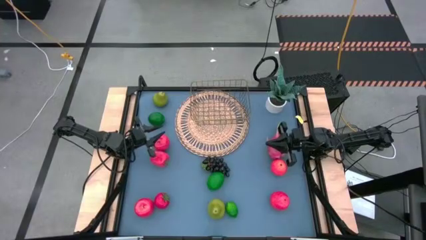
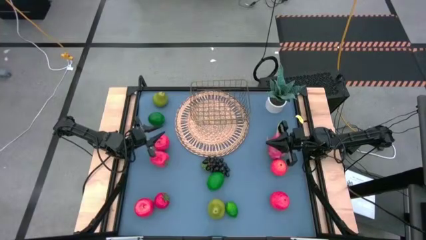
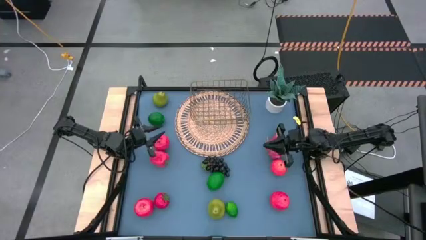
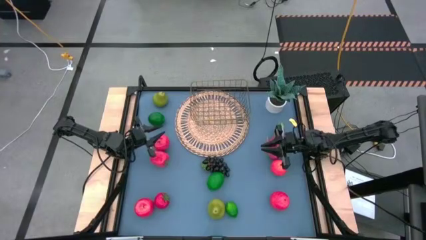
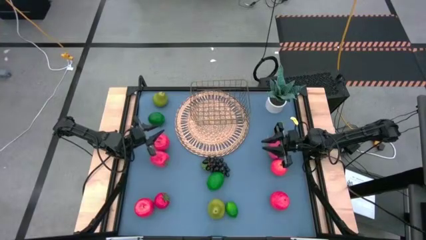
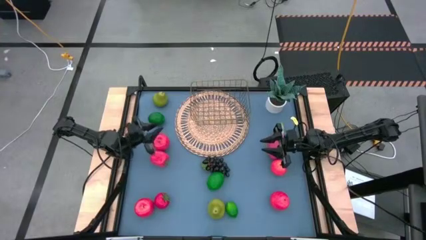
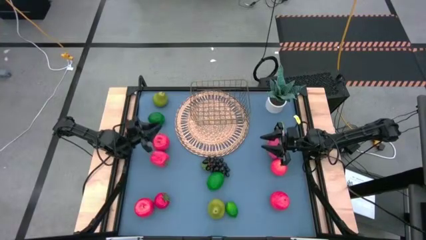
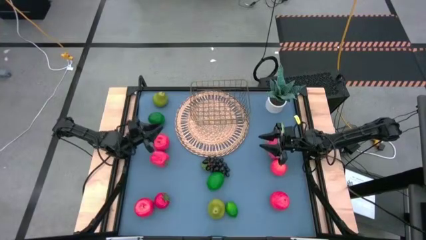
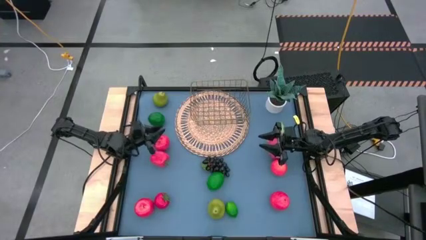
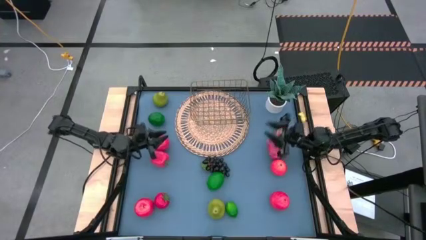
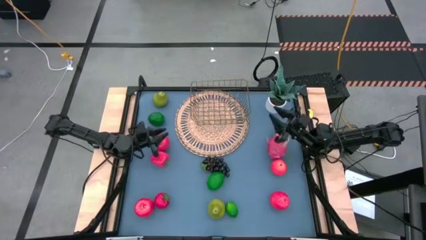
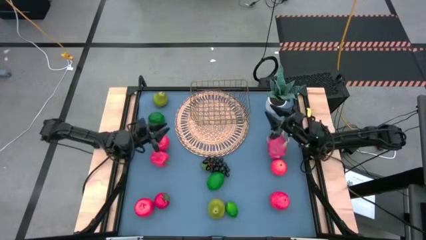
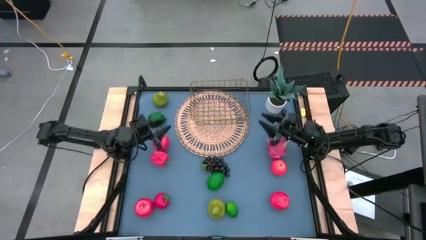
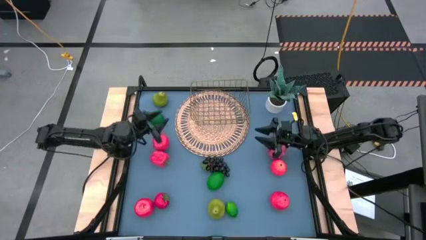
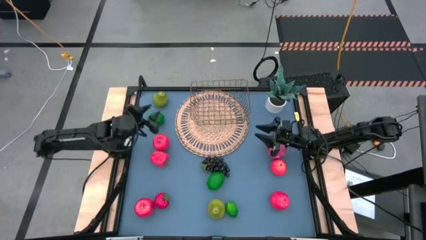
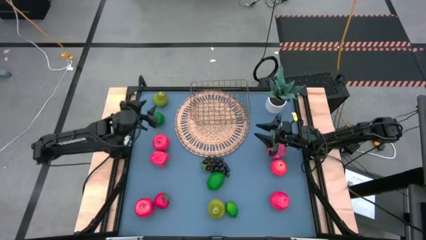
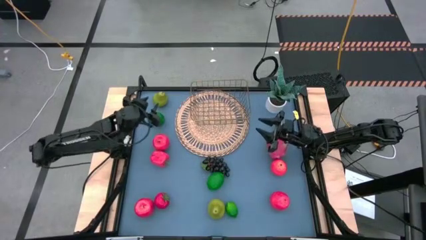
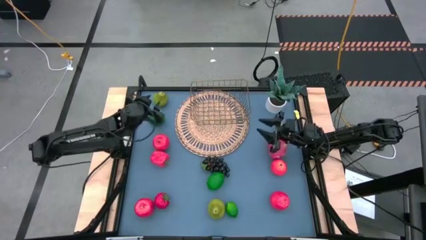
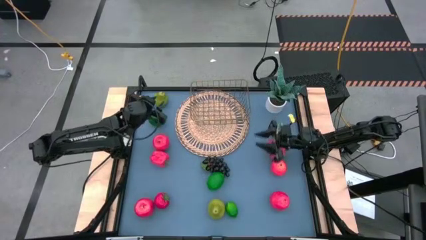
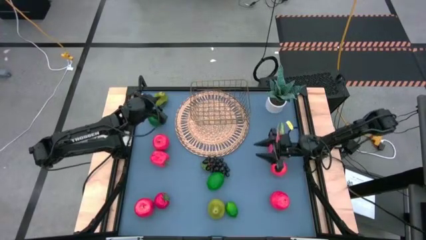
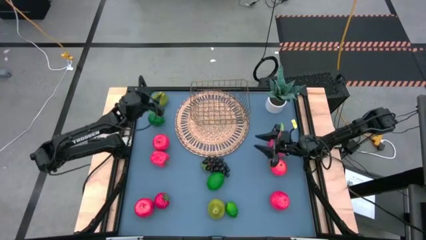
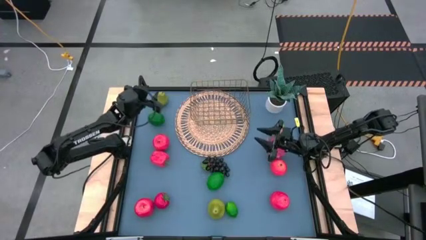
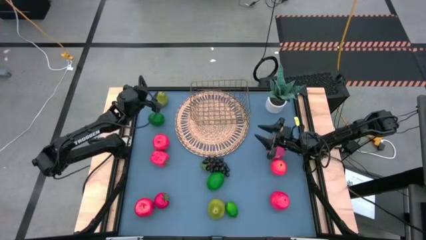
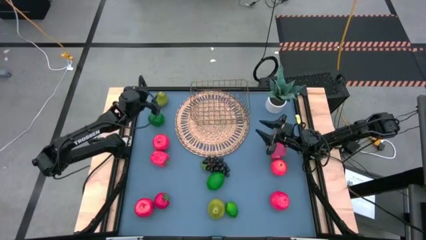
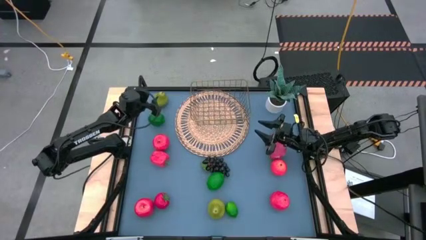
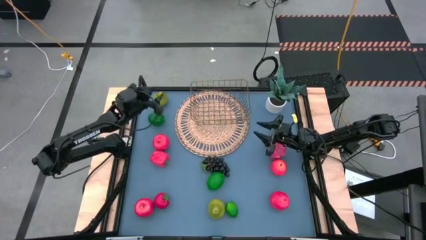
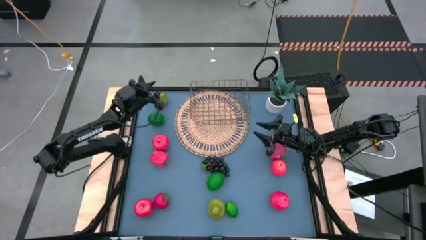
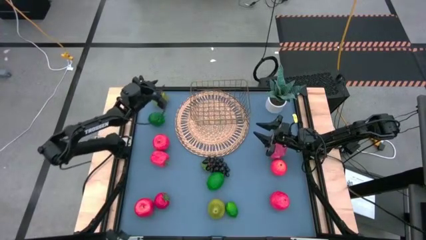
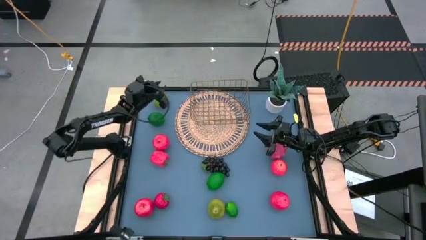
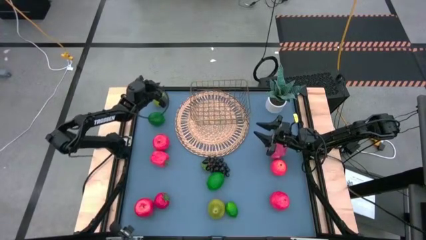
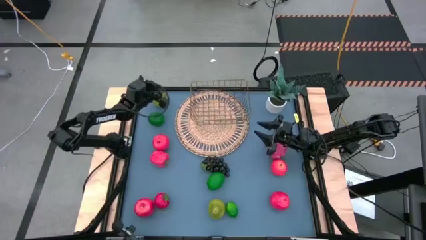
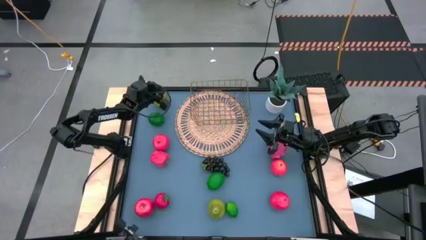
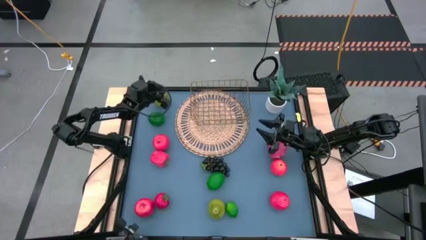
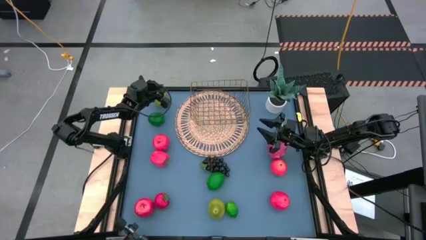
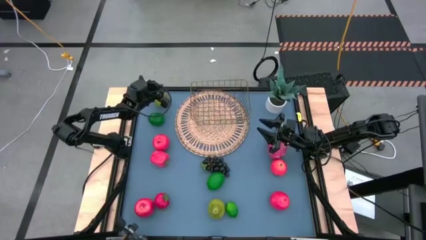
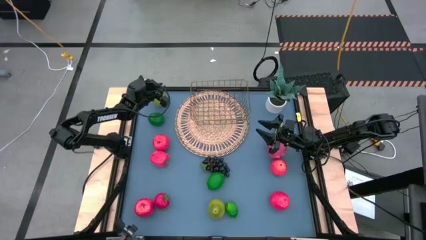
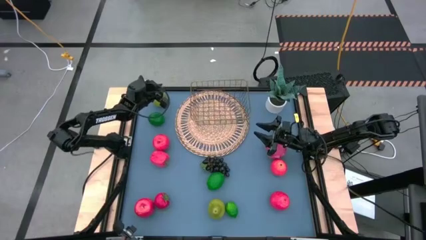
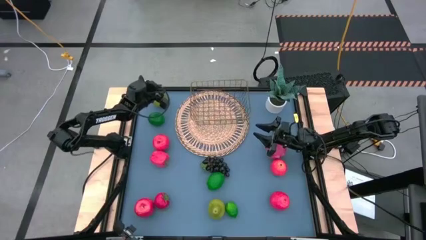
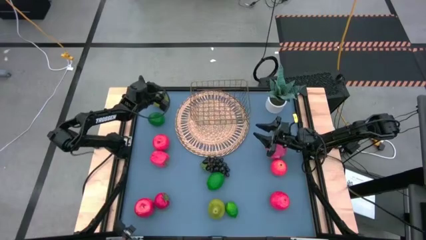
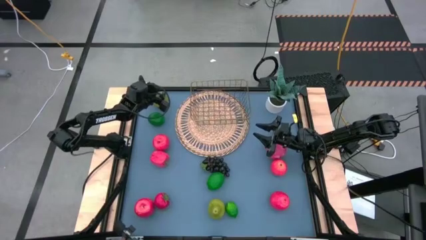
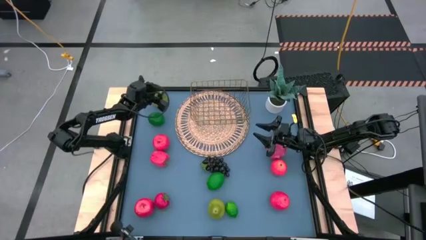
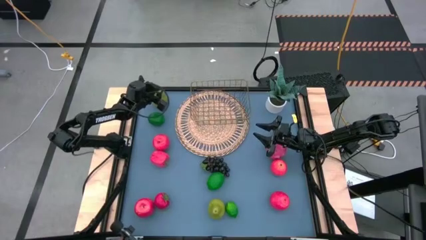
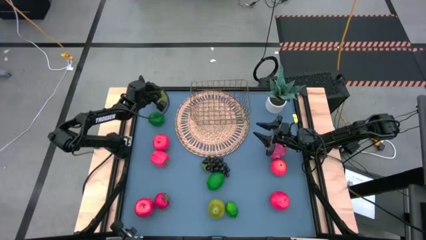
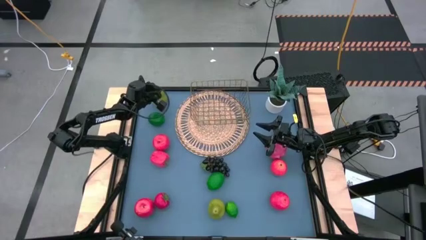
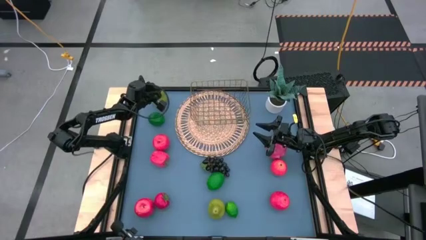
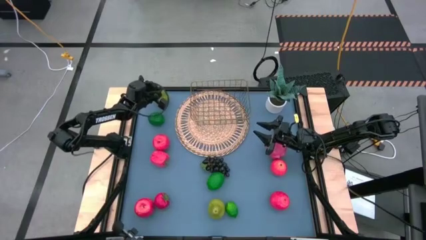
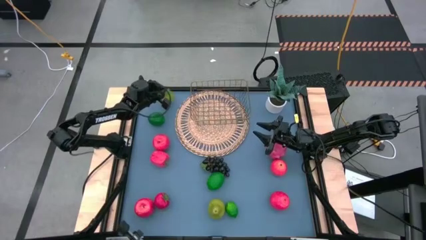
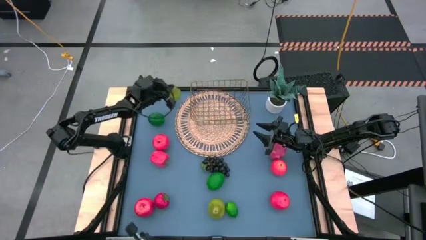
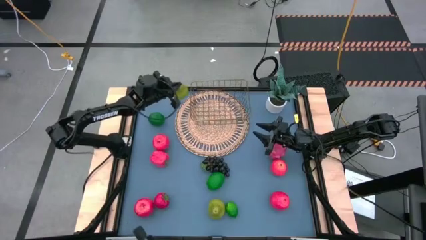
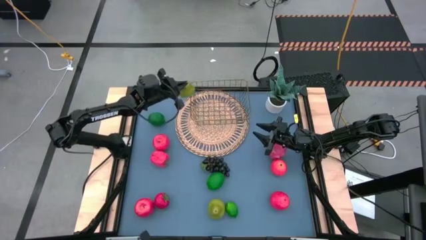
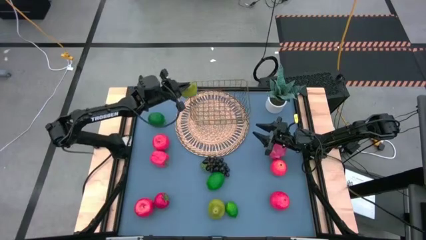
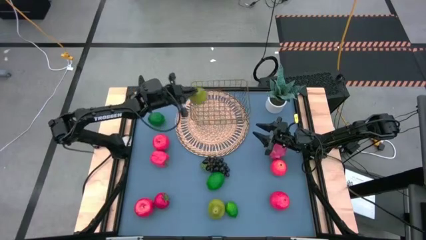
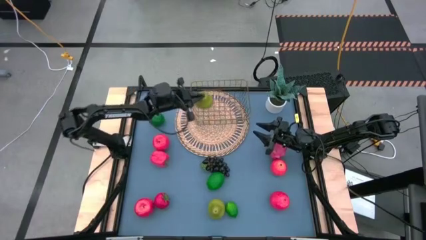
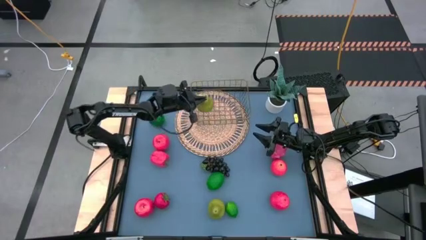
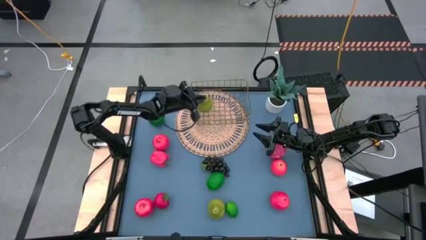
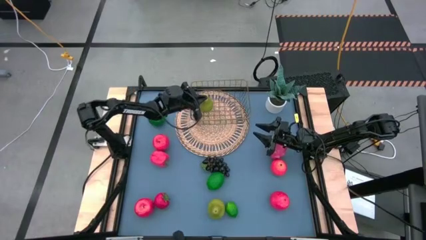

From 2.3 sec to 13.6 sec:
Task: Build produce basket
Put the top green pear into the gold wire basket

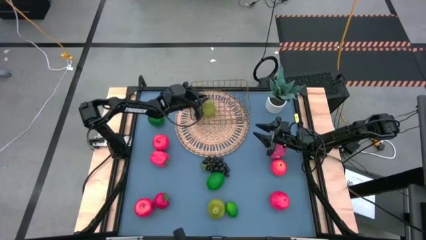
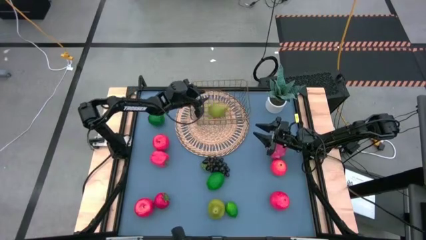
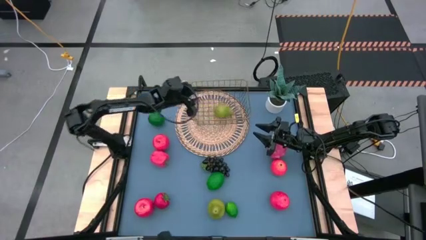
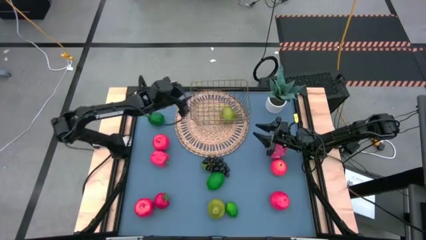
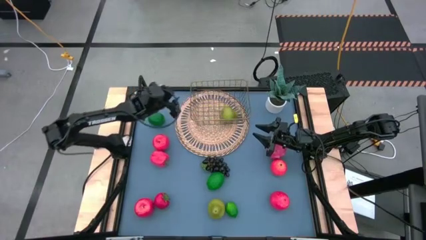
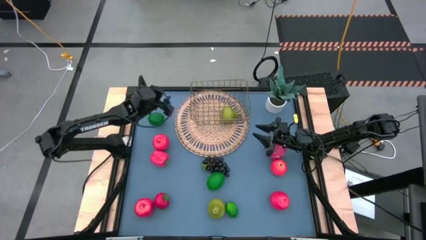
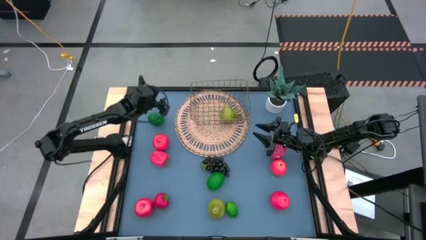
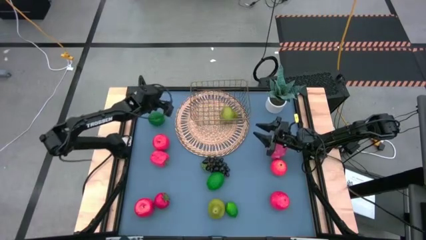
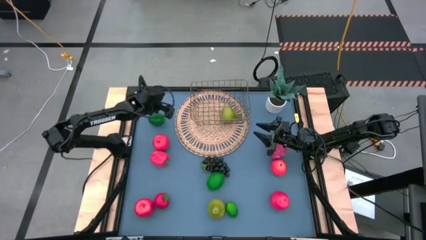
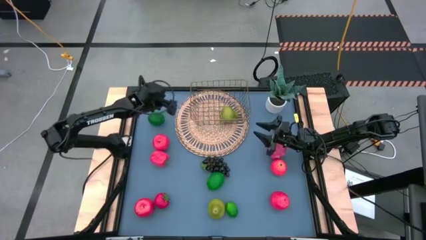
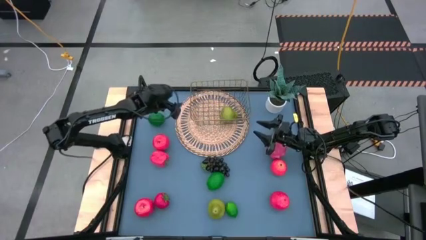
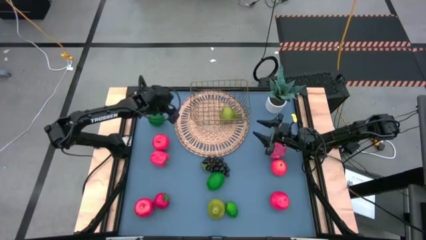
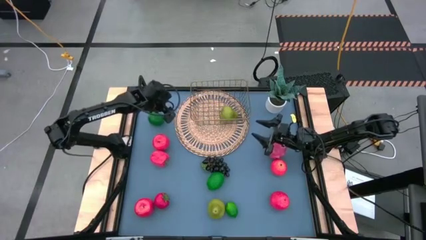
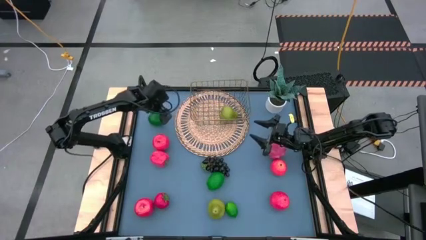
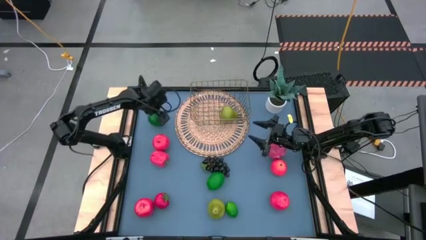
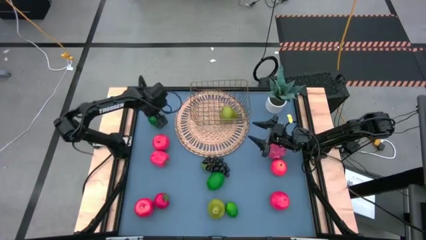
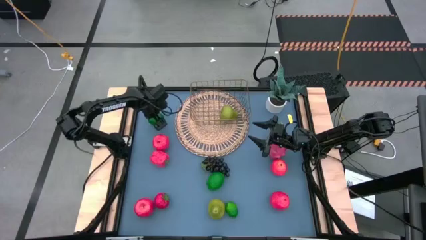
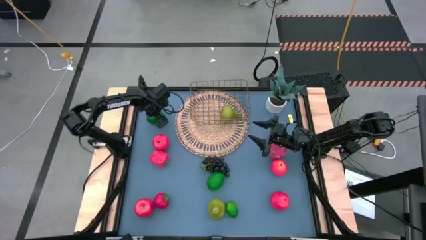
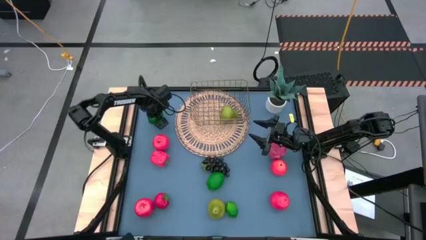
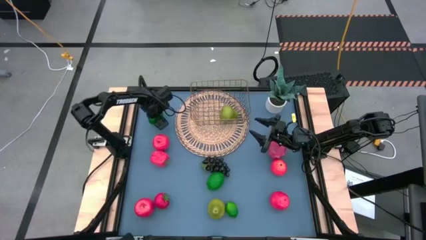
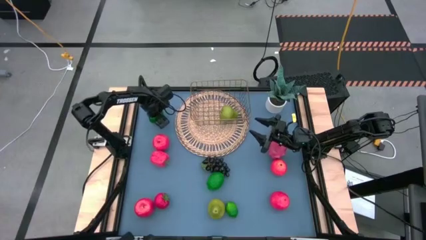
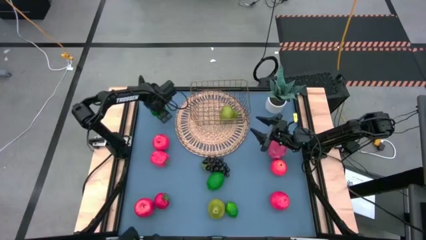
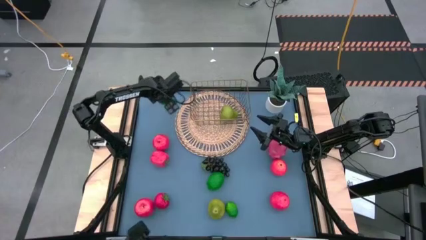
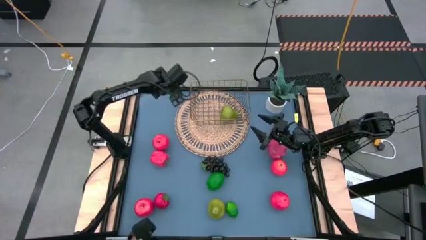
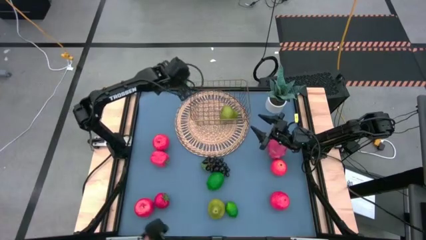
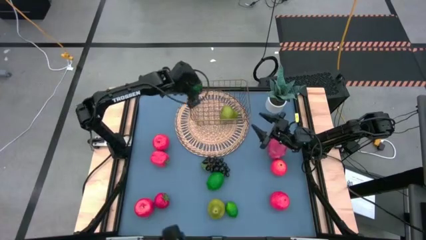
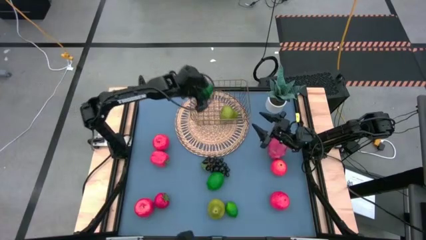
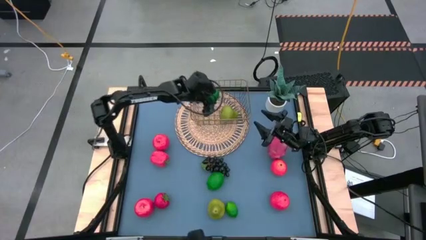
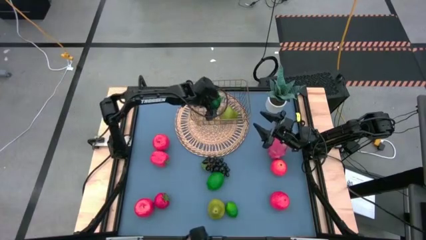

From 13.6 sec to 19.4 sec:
Put the top green lime into the gold wire basket
